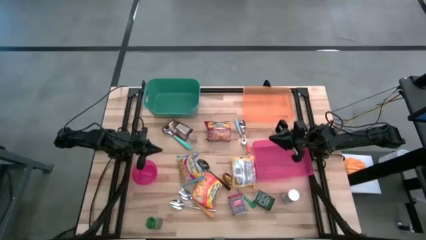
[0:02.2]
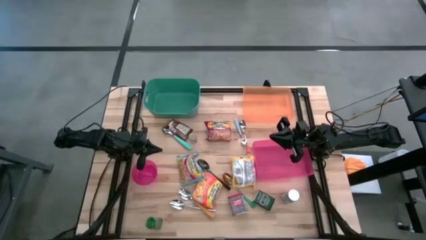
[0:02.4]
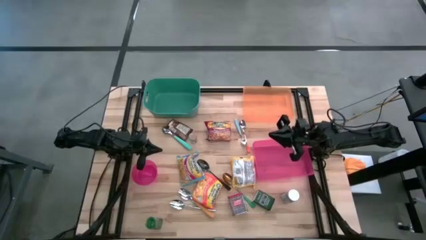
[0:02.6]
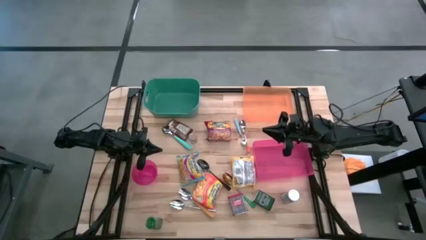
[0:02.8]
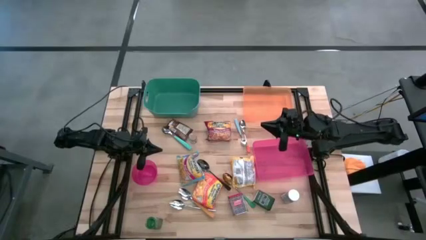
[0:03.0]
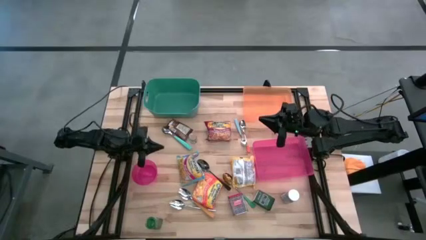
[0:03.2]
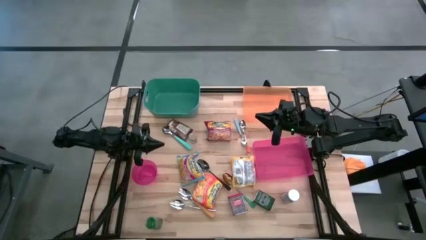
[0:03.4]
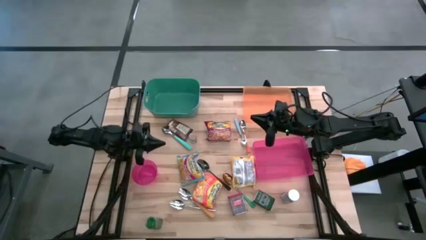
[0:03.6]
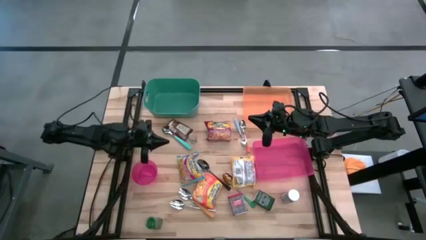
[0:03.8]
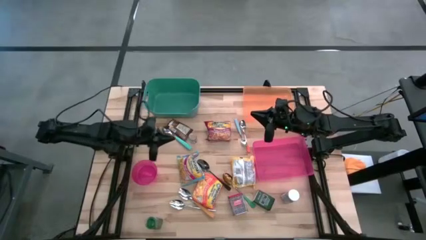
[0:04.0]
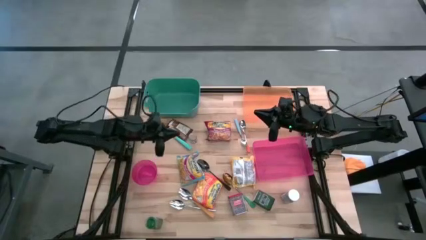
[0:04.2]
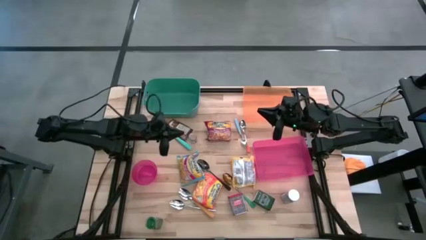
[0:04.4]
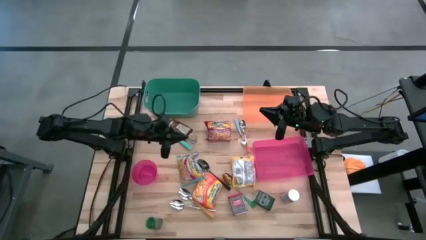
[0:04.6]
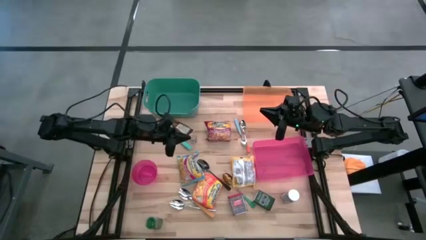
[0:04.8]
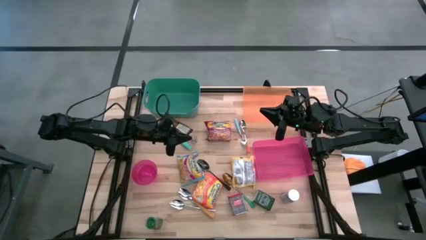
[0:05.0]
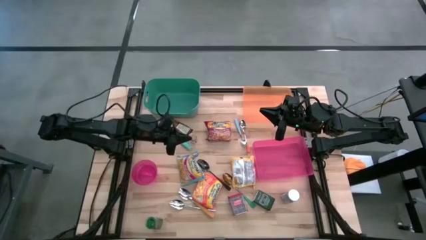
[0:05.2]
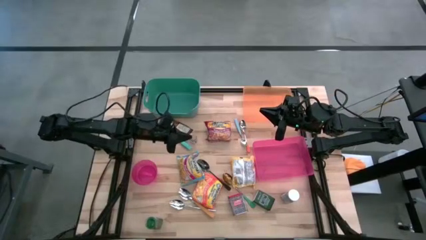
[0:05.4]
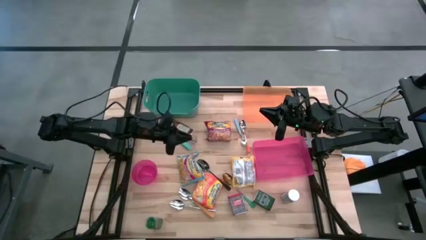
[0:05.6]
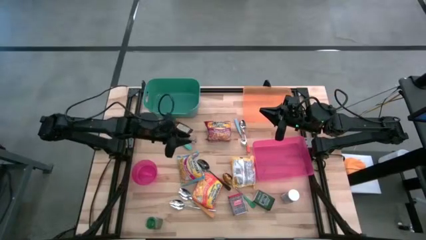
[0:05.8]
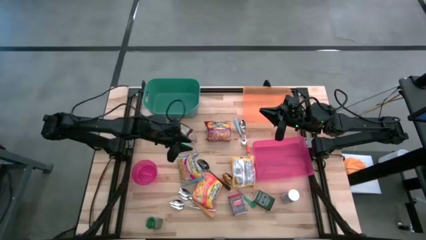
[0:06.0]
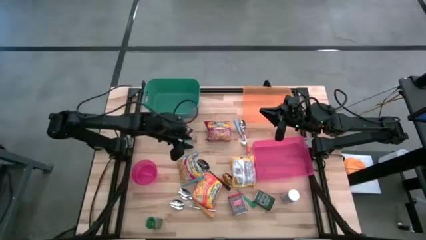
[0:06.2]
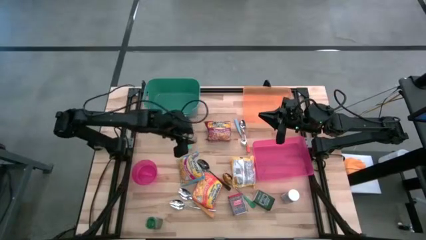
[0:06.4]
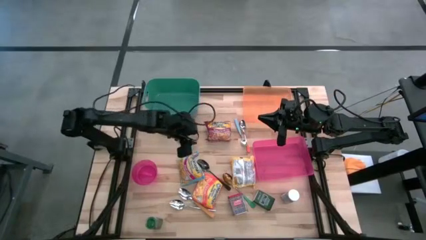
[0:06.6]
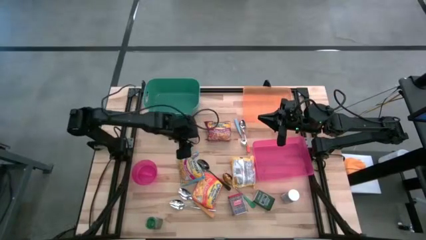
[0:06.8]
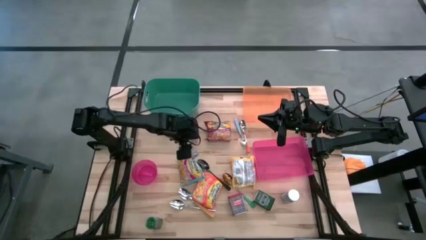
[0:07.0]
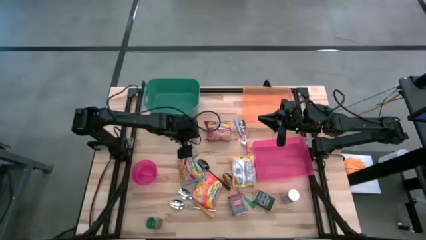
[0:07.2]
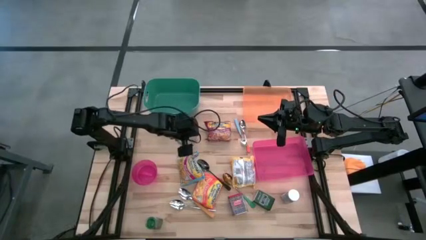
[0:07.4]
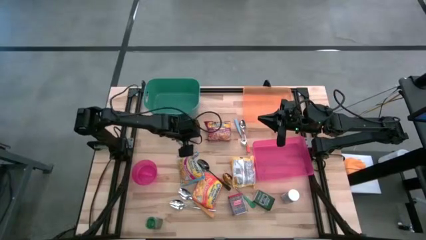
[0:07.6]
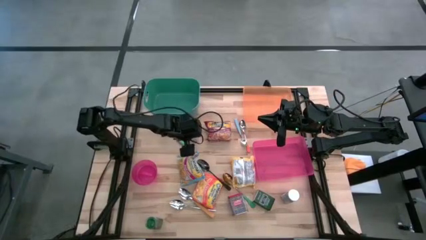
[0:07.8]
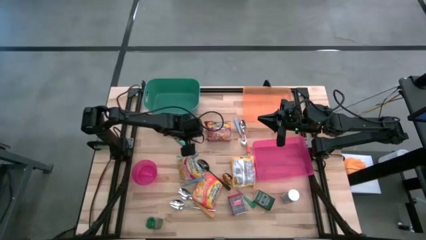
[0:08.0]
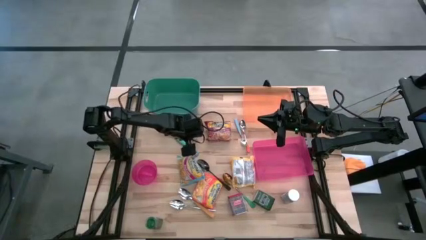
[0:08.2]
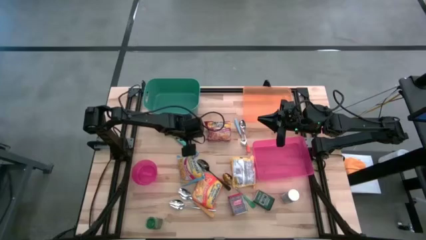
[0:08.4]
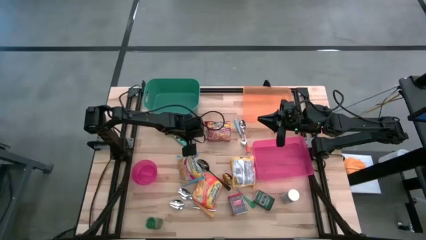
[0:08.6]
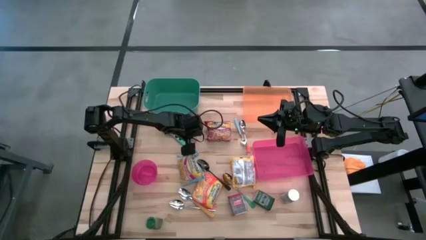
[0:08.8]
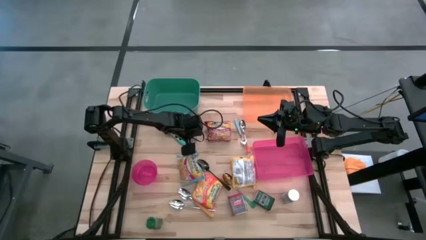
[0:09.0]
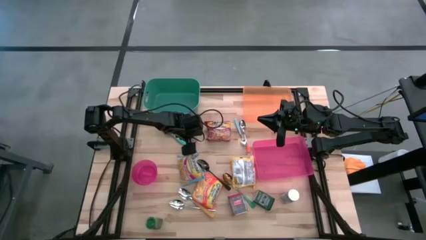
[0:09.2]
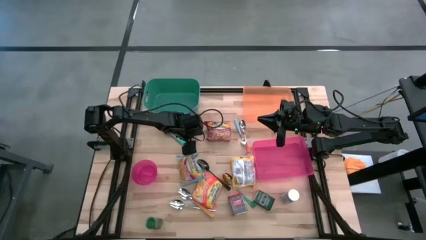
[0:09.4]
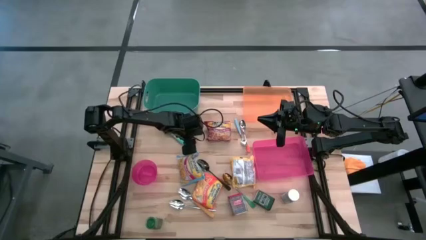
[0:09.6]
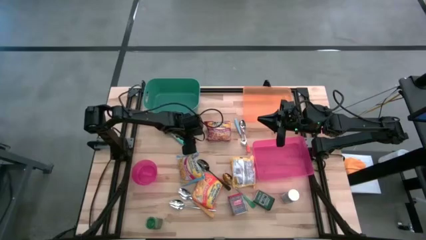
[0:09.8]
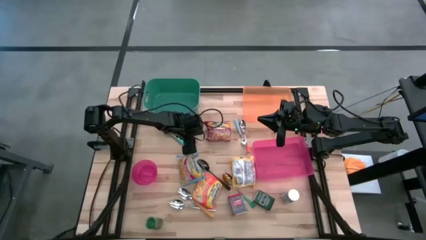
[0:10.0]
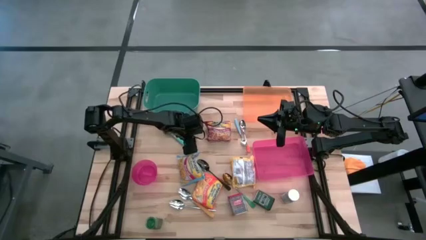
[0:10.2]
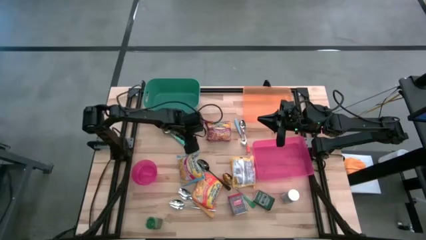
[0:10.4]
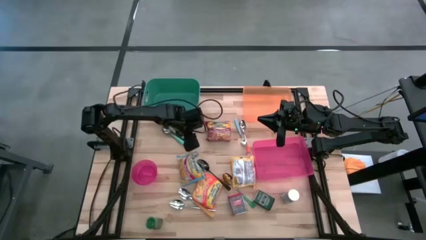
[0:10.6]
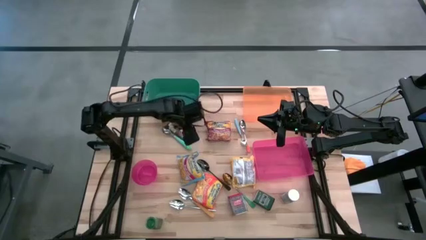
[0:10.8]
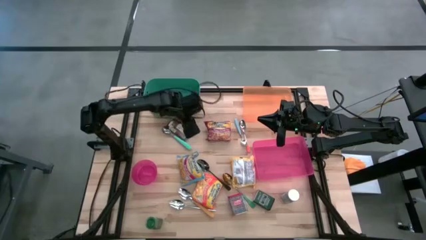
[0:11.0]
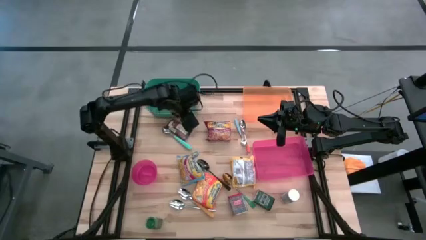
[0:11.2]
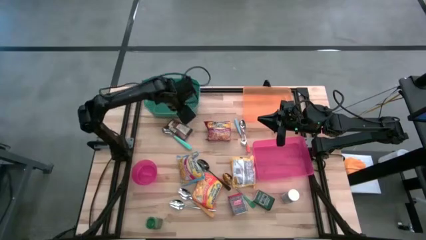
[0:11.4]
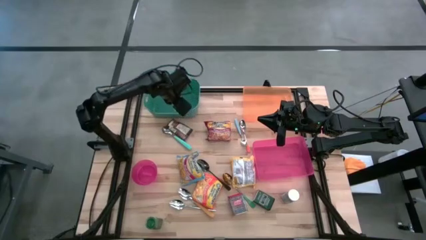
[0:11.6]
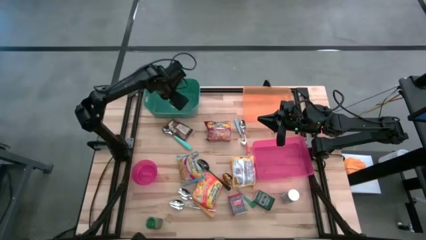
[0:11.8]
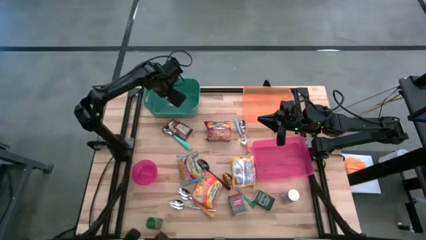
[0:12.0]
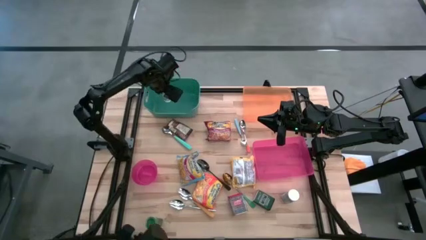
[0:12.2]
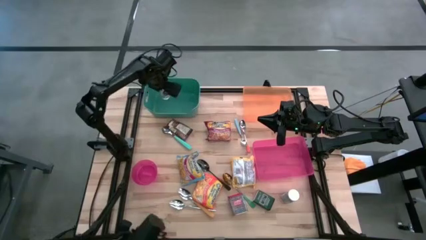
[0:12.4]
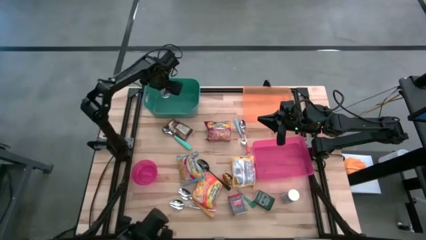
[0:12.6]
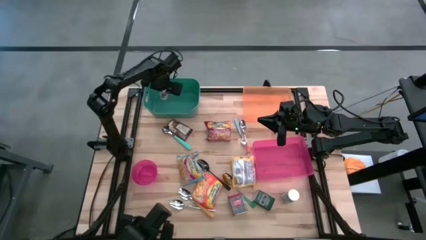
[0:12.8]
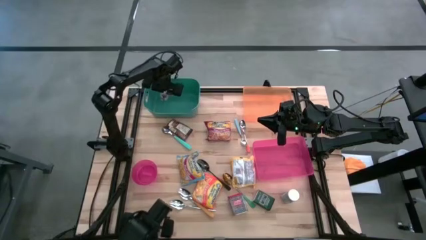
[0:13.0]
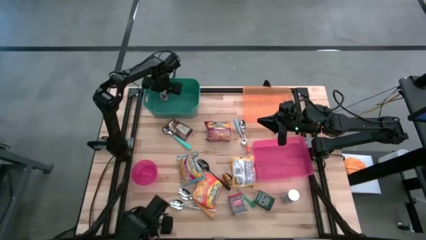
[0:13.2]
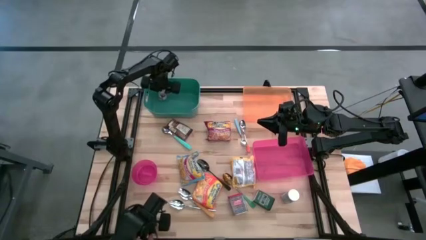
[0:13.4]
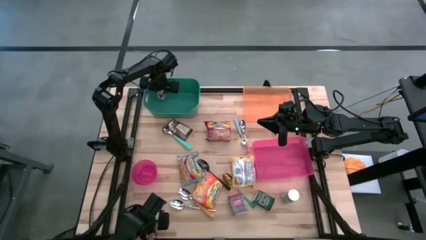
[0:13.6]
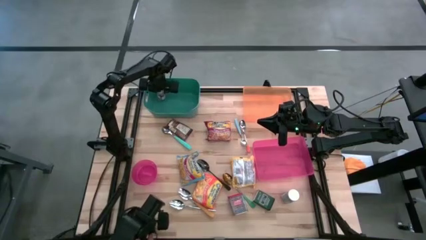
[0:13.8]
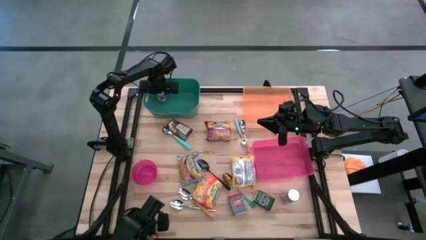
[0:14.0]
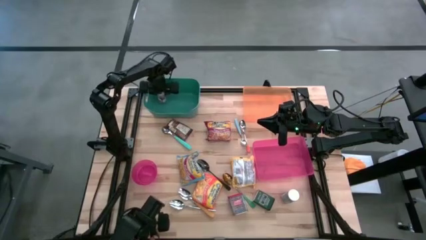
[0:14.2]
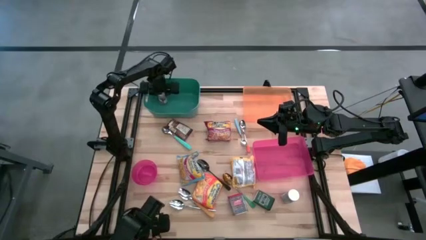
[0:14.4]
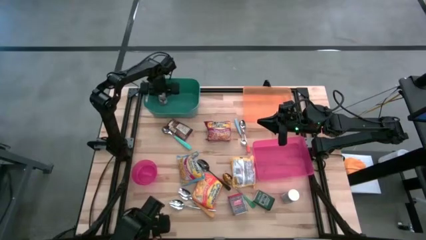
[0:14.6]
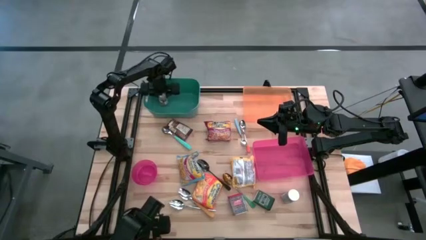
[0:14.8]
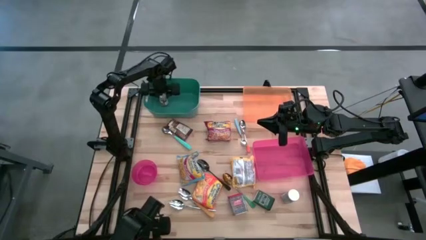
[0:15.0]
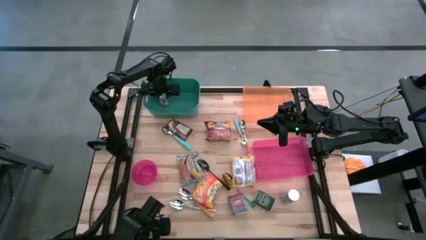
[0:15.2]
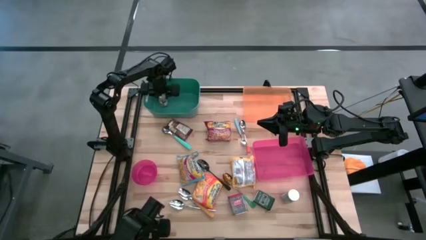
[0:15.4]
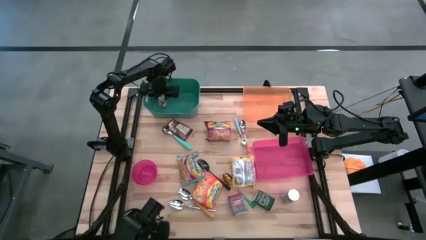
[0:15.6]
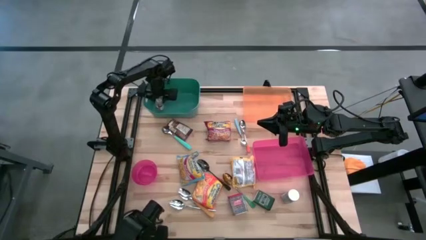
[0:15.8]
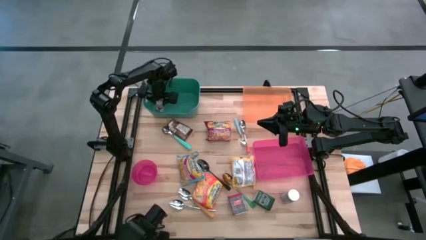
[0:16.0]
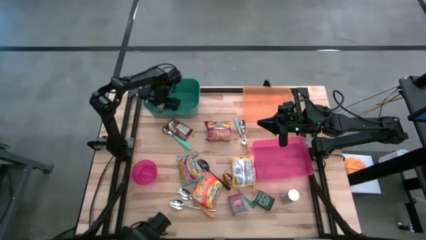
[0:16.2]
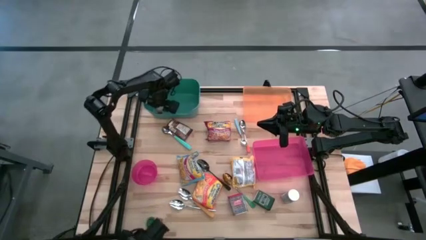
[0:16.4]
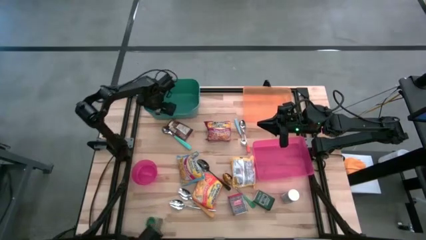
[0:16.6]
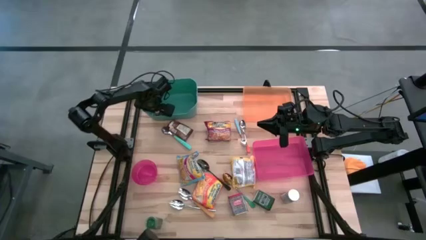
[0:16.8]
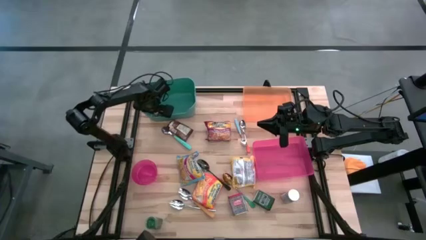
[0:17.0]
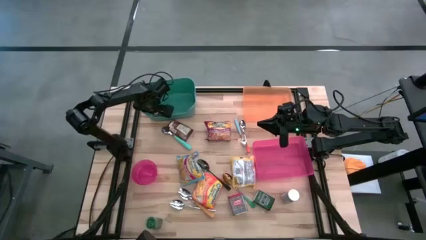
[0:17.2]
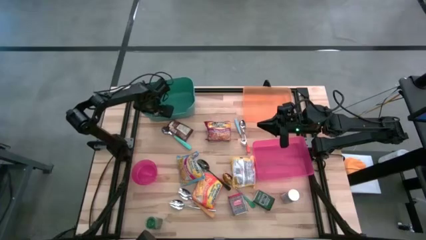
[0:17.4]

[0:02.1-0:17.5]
Put the brown seasoning bottle into the green bin
